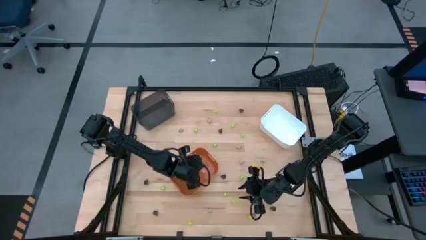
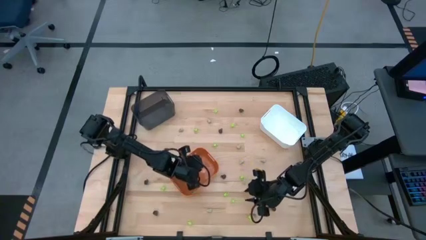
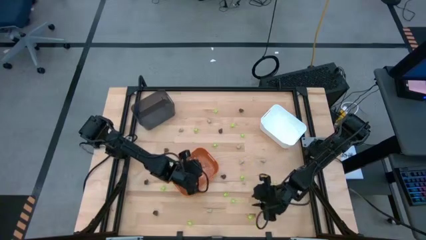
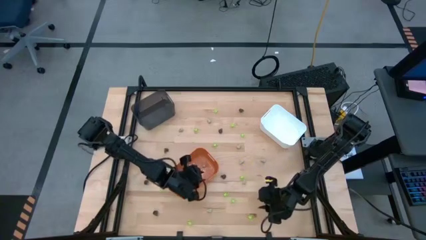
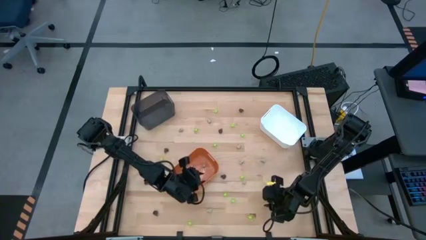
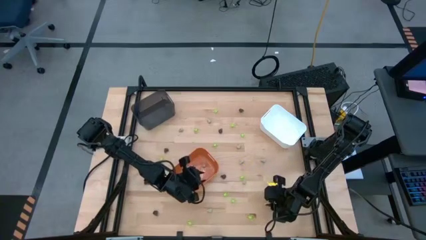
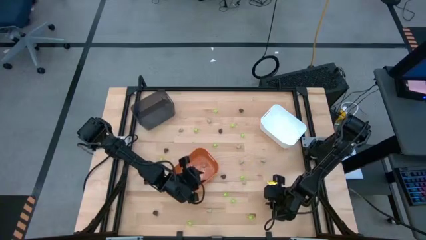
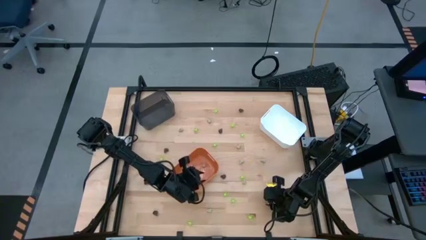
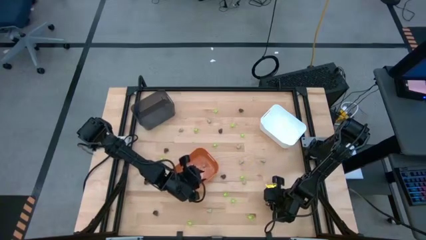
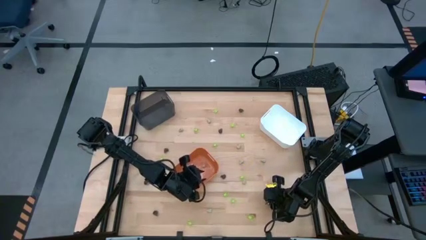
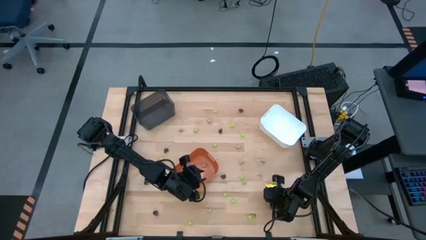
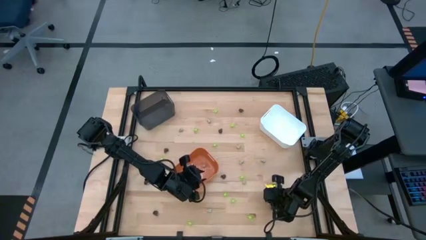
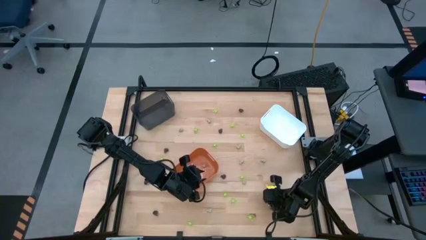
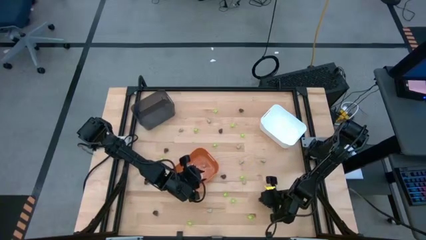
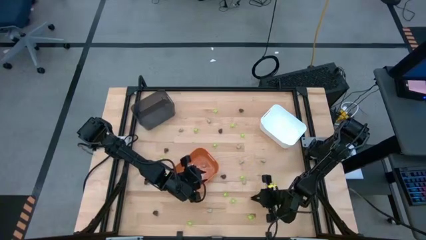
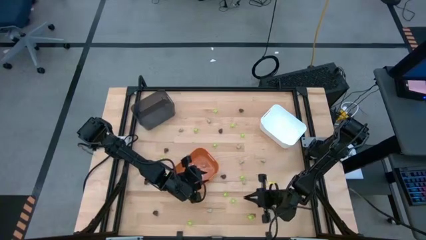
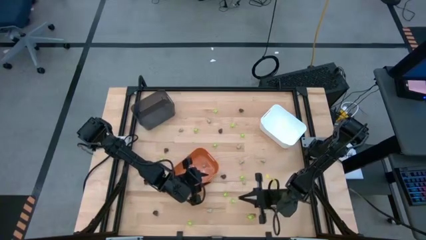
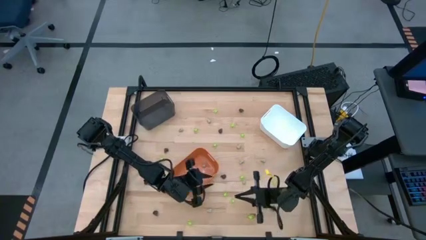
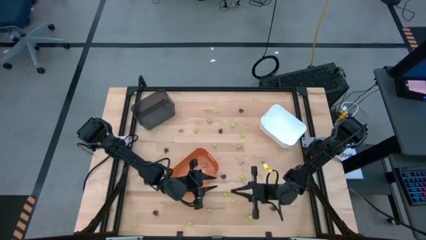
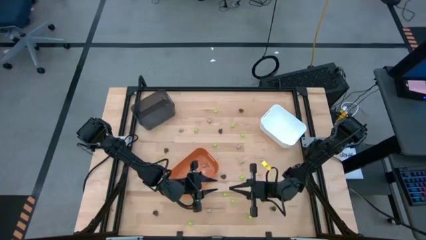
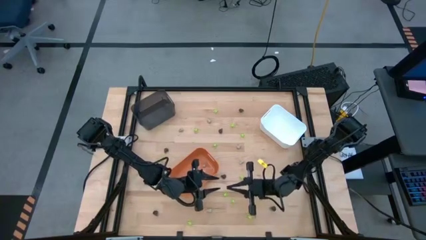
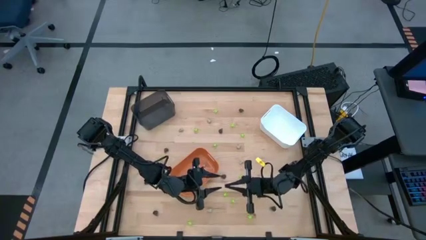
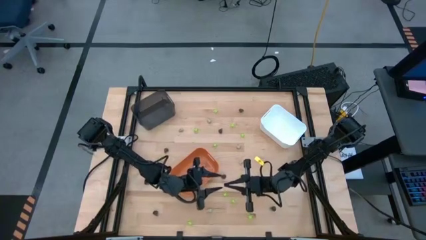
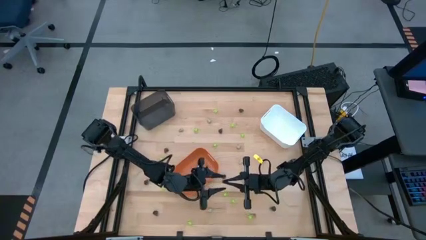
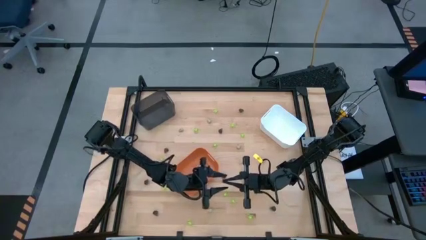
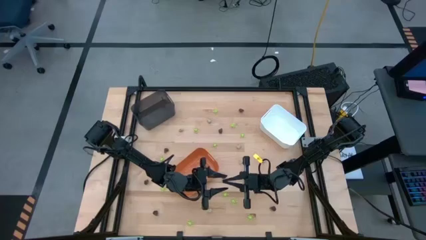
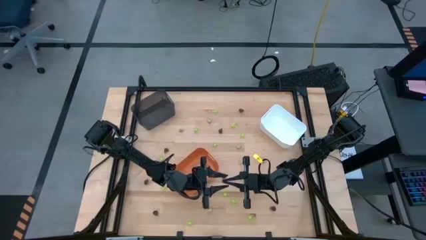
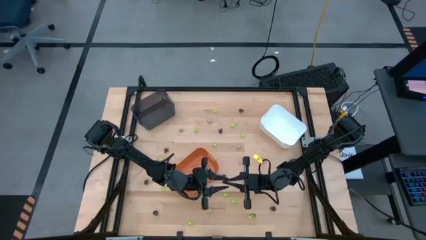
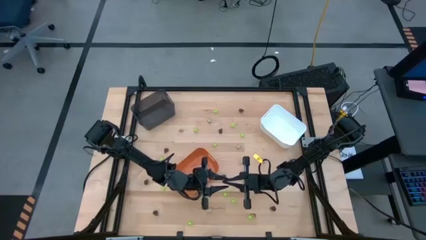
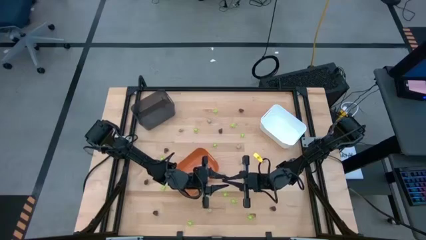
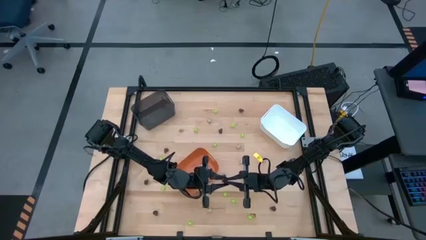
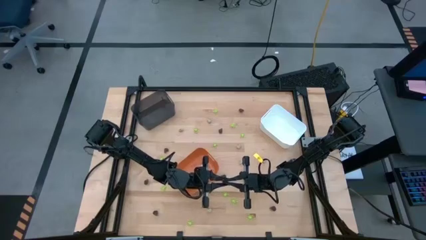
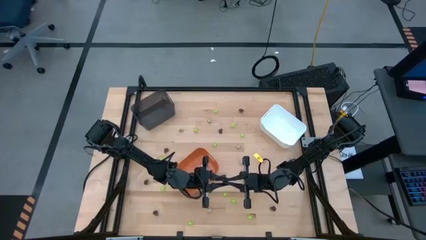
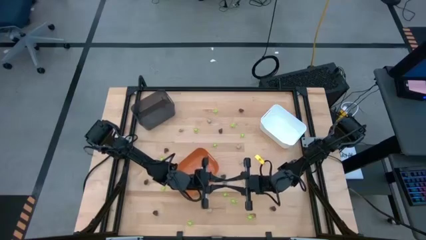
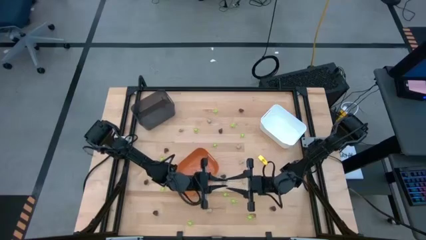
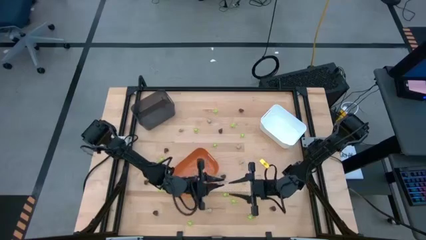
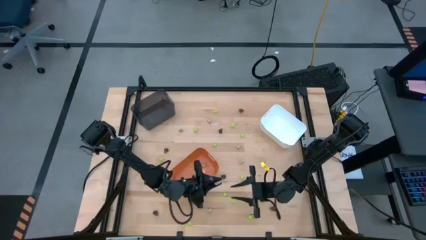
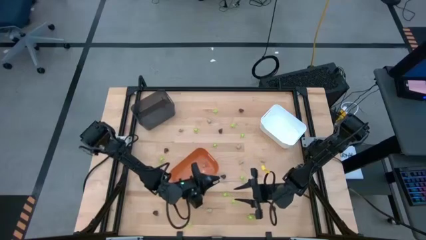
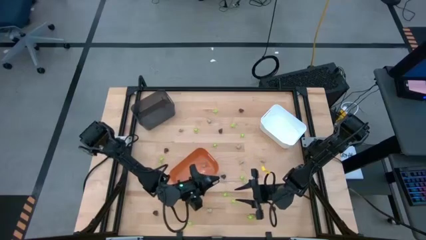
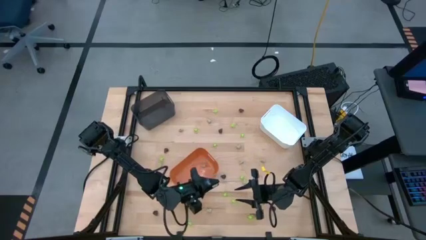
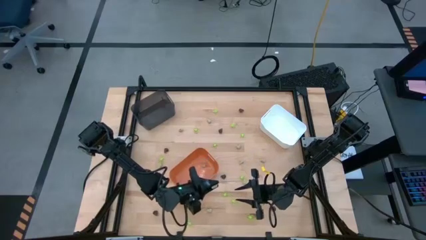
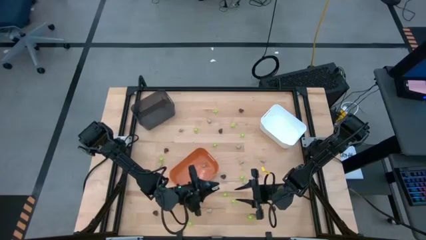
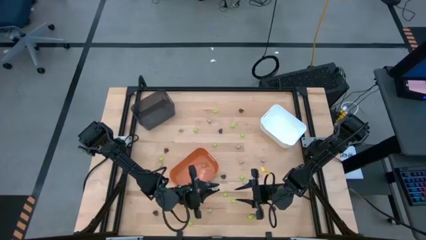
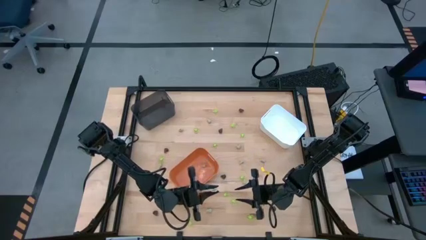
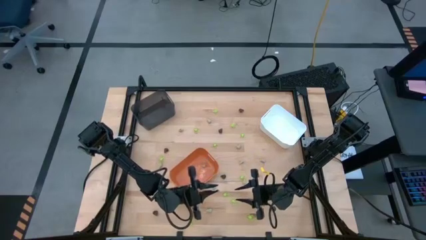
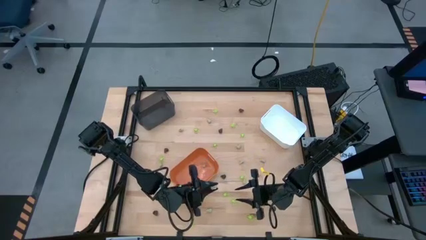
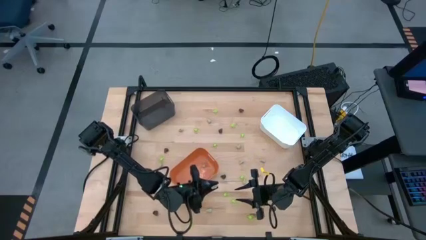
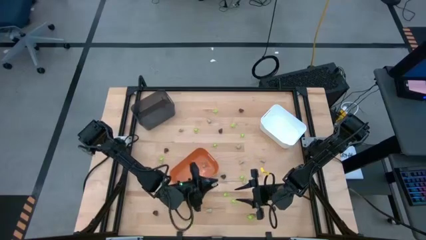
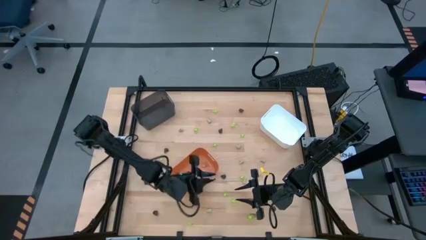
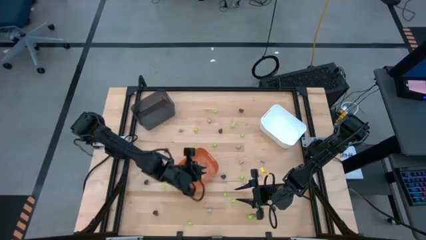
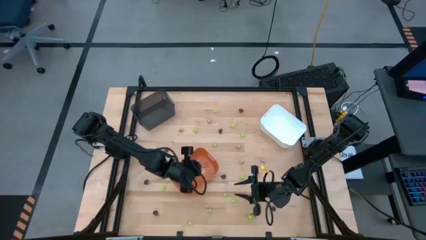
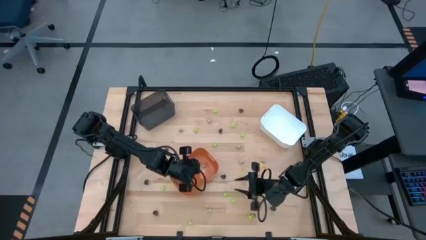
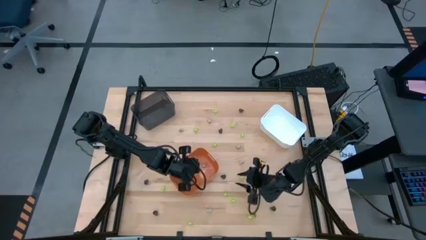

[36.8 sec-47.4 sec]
Task: Sort Halloween decoration
Put the small white skull toy into the orange bin
